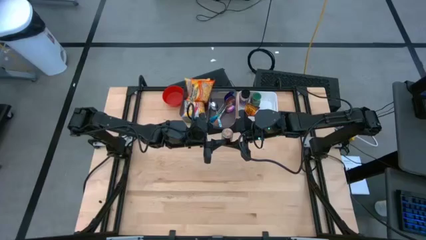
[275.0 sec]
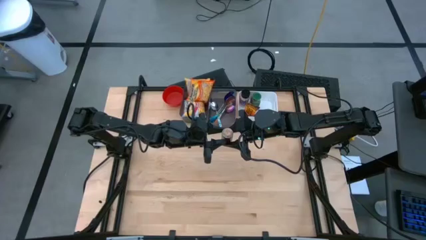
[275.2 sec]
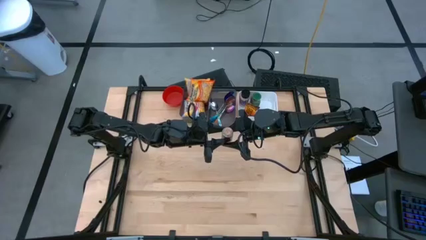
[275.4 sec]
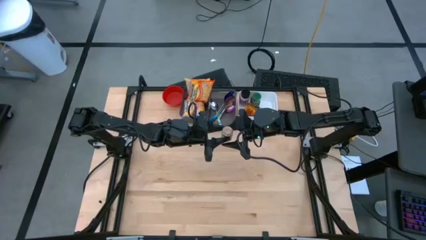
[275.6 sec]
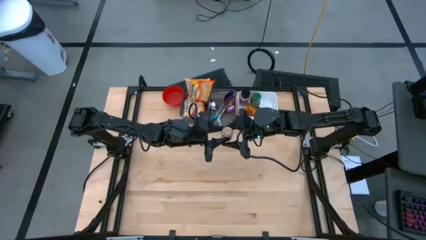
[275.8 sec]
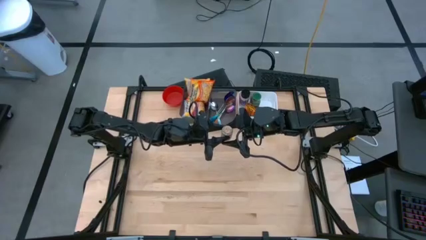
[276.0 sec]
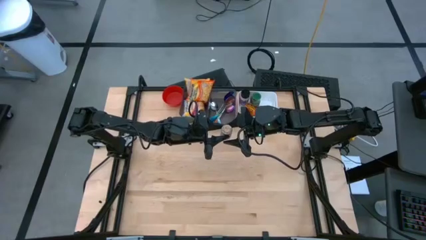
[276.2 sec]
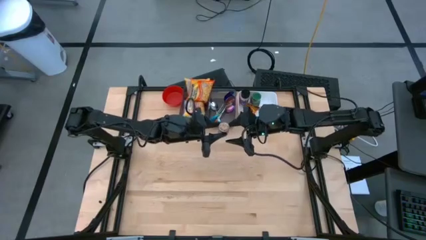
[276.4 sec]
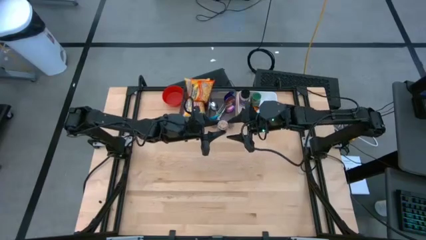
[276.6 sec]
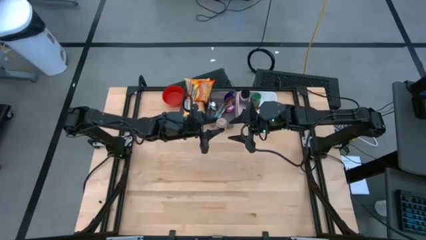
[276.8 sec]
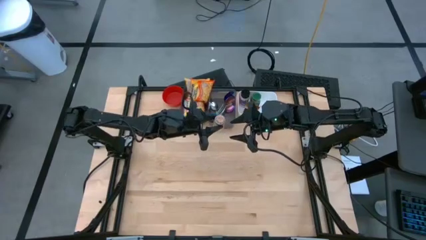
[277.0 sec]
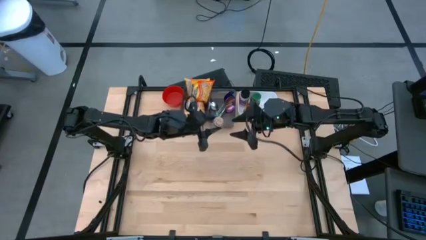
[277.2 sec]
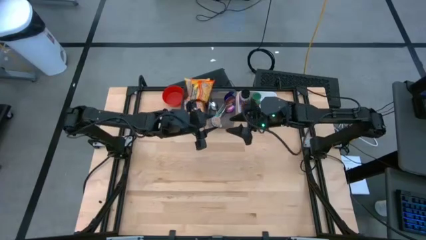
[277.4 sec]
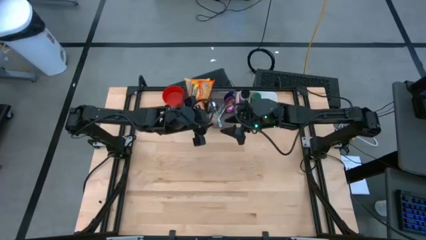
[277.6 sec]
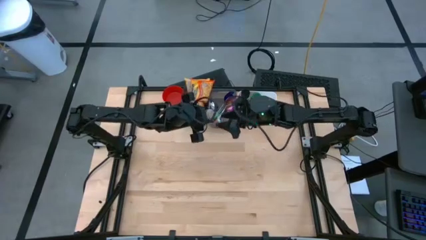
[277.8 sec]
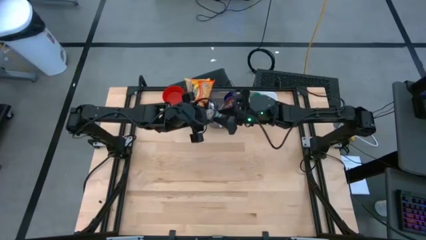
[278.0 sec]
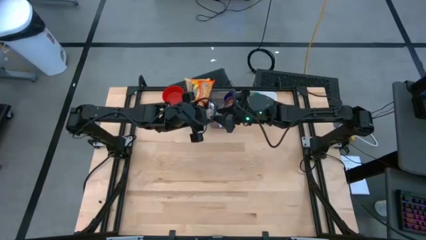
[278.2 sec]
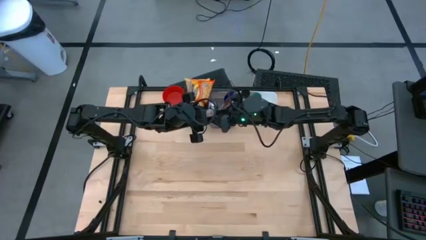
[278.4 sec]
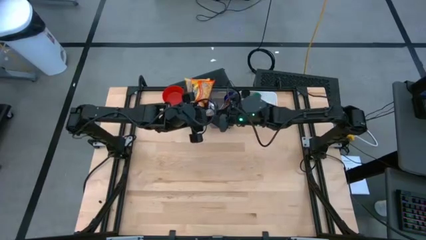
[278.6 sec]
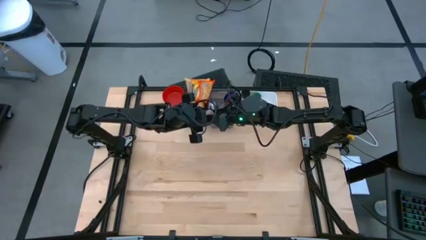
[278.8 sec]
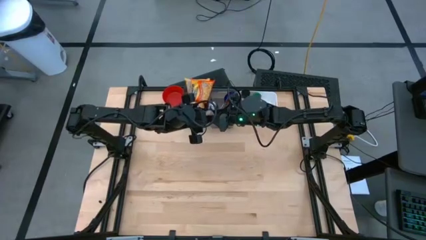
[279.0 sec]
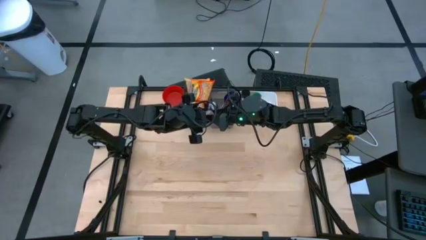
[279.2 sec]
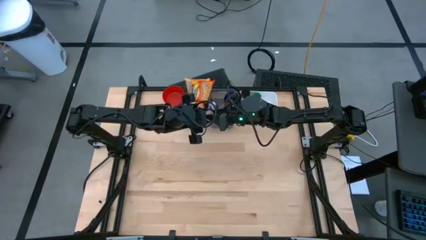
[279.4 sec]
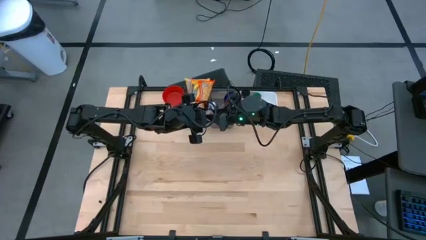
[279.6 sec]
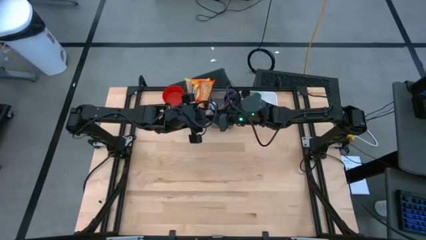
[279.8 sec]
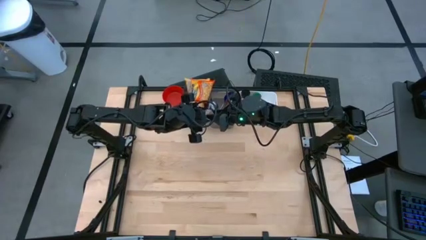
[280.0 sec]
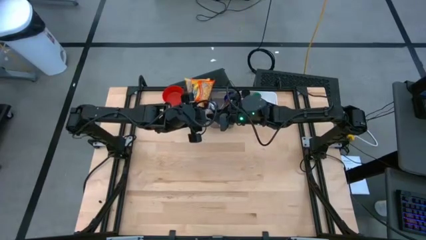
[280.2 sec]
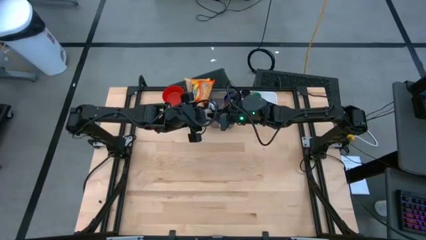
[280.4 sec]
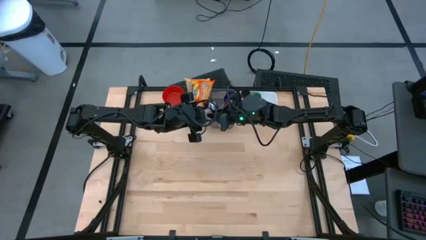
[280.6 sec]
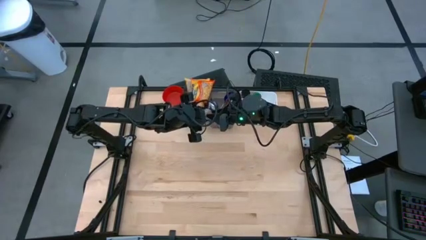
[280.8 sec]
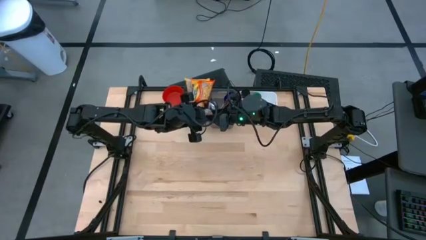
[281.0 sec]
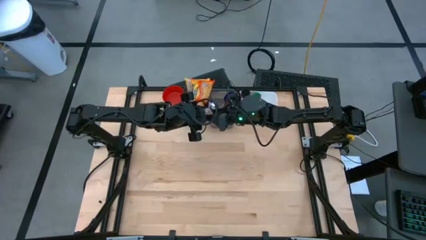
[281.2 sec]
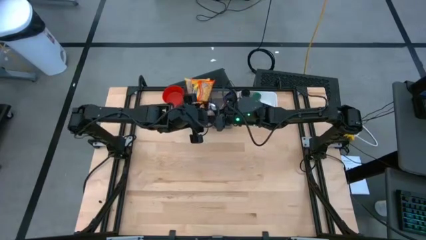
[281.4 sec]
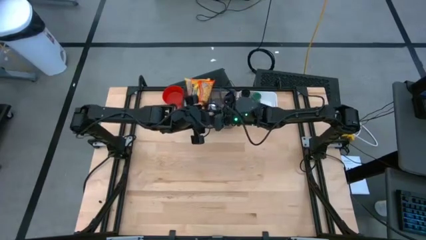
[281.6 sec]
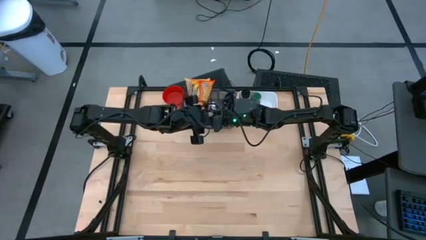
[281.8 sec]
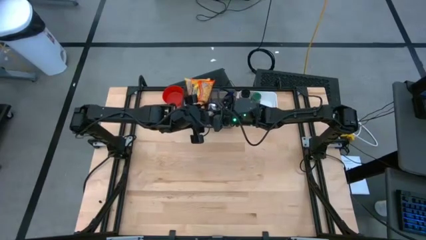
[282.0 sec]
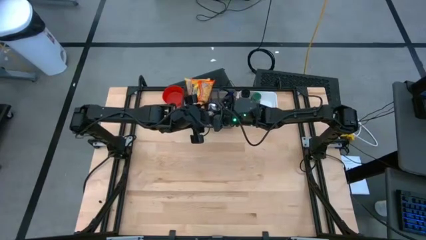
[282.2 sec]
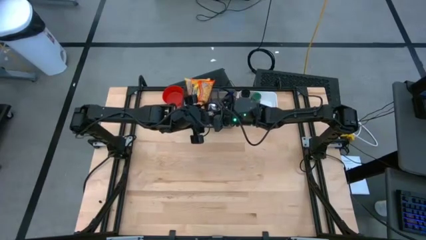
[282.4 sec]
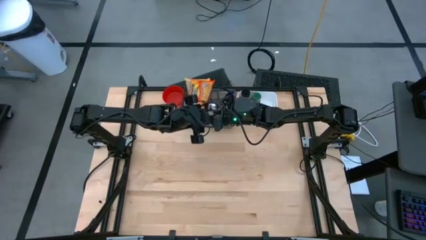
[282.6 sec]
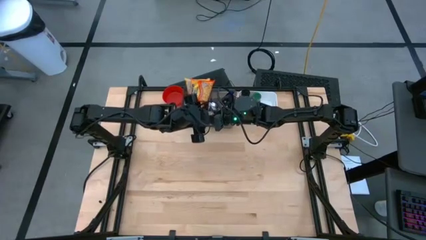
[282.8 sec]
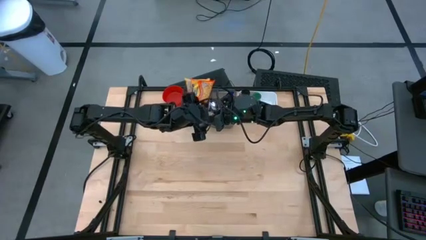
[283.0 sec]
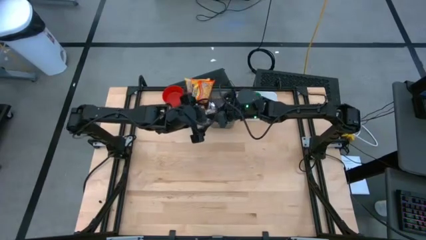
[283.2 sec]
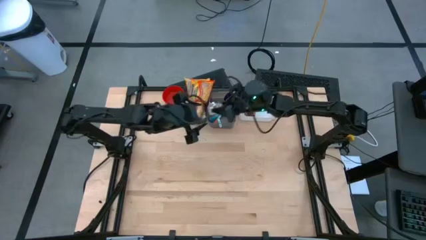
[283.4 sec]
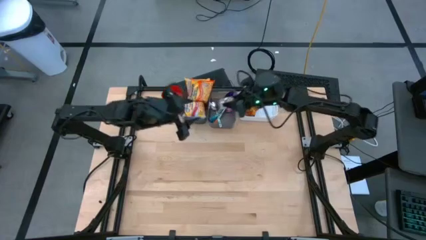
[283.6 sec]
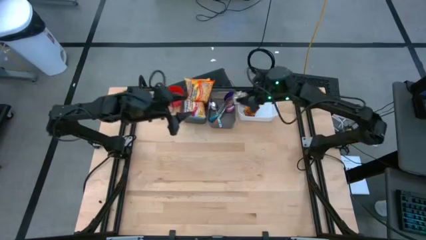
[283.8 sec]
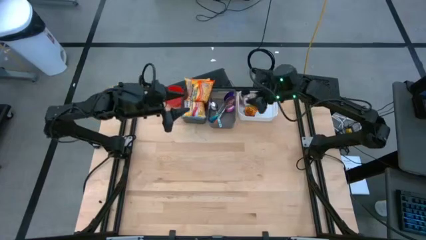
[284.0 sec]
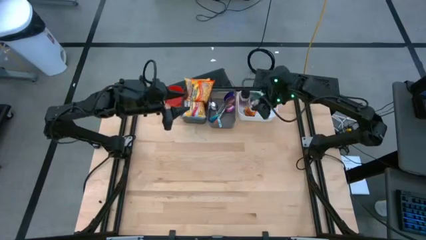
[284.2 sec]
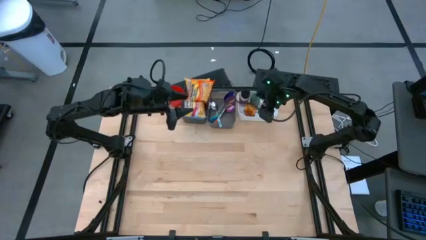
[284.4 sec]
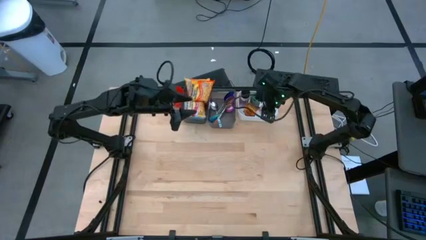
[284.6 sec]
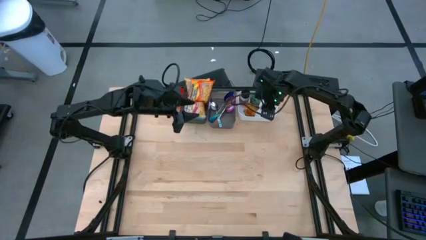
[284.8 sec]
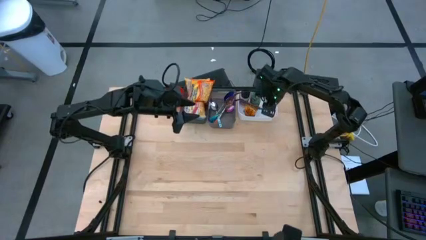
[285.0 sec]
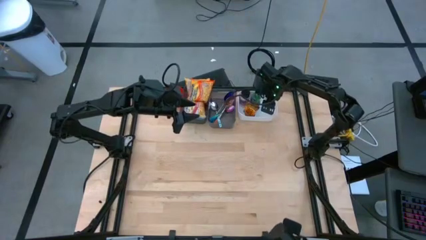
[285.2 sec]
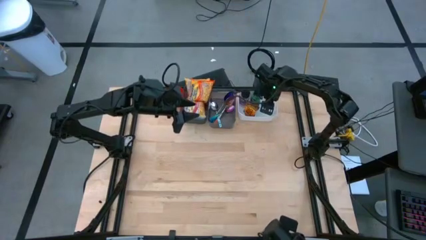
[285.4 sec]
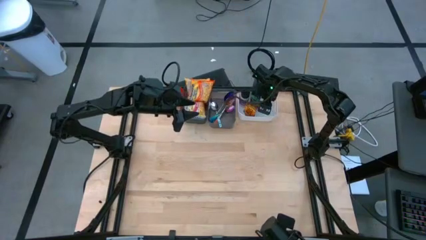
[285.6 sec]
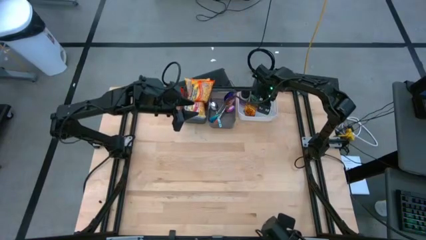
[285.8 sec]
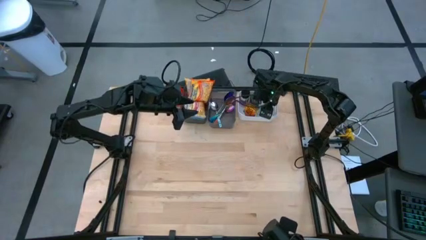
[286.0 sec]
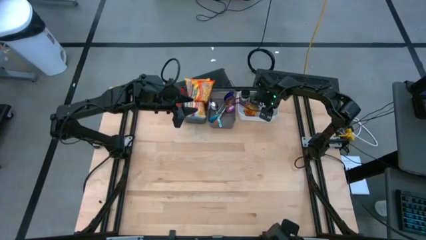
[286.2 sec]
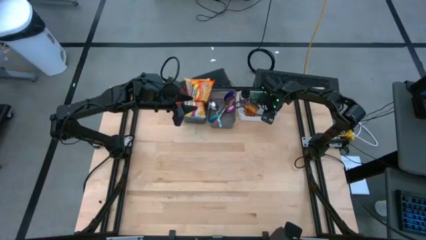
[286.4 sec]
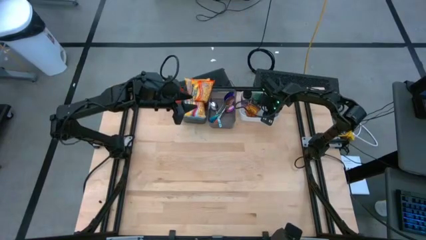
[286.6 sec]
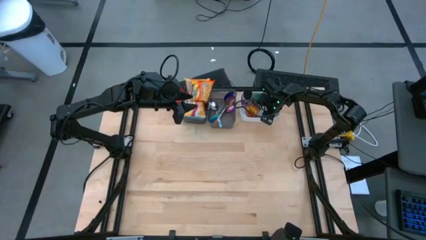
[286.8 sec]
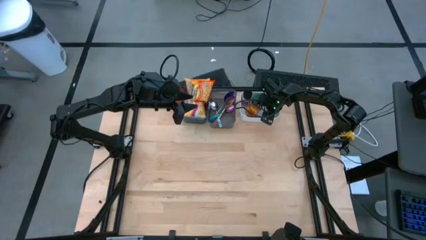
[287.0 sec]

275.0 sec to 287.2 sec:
Task: Pick & Place Food Item
Put the brown seasoning bottle into the white bin

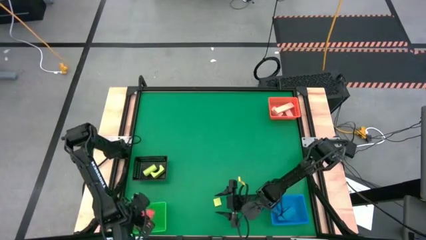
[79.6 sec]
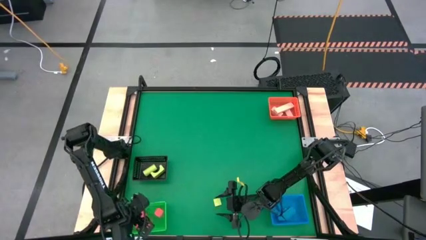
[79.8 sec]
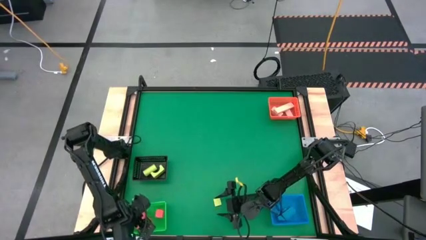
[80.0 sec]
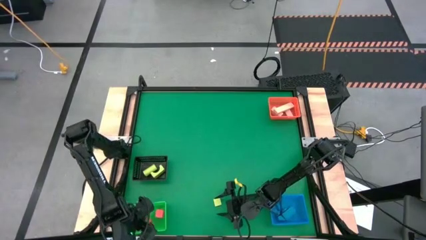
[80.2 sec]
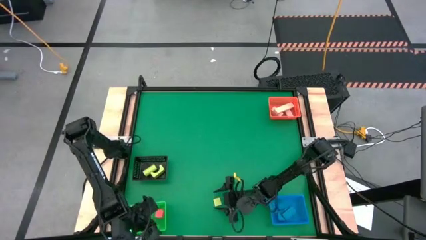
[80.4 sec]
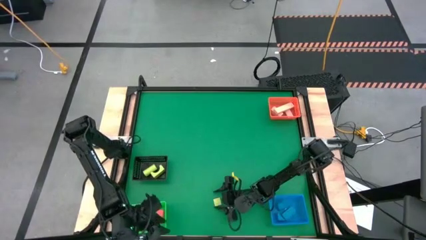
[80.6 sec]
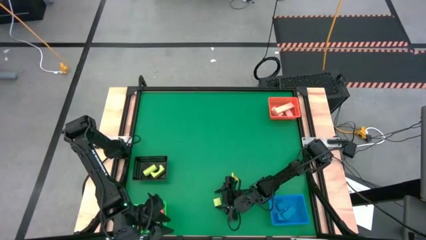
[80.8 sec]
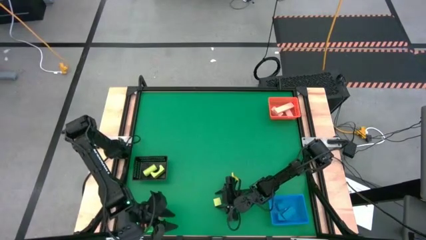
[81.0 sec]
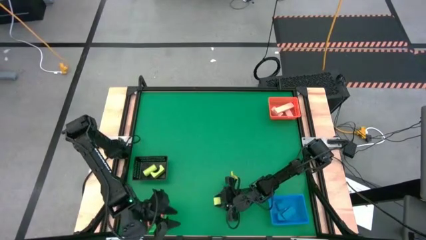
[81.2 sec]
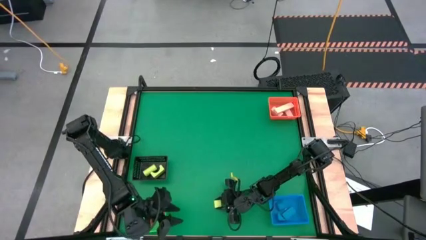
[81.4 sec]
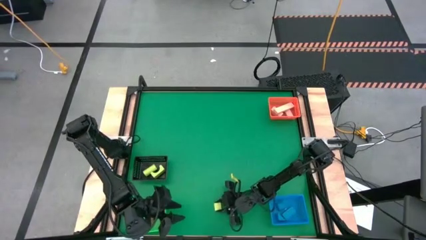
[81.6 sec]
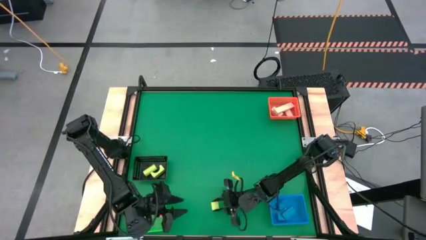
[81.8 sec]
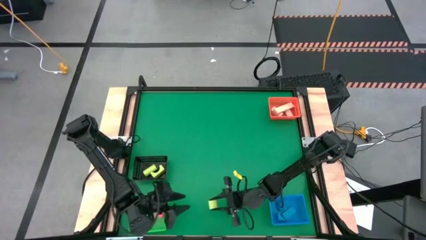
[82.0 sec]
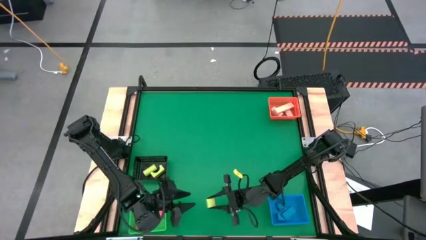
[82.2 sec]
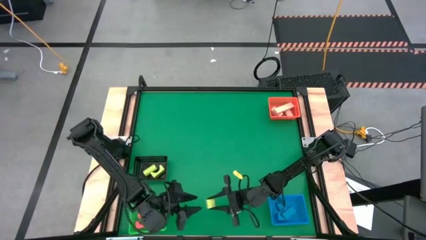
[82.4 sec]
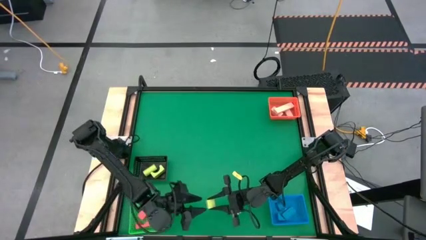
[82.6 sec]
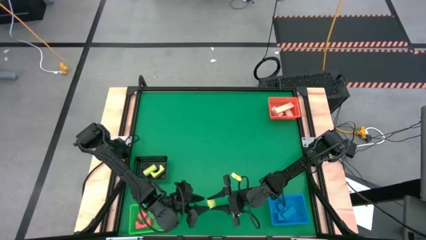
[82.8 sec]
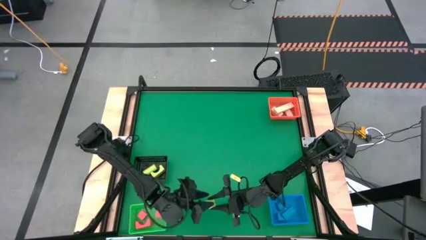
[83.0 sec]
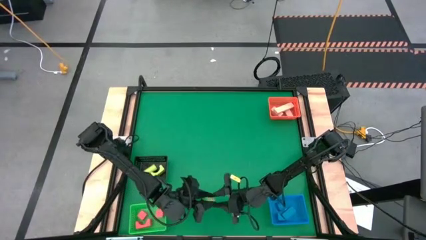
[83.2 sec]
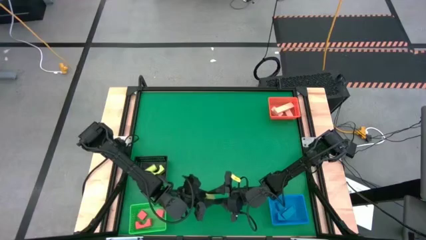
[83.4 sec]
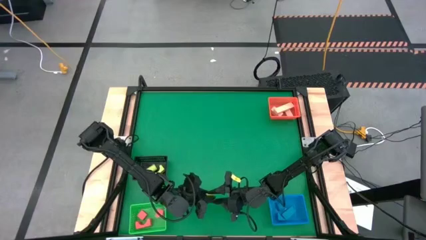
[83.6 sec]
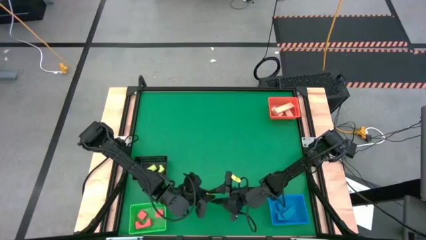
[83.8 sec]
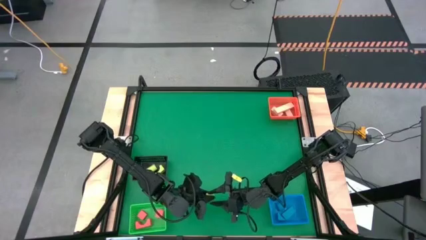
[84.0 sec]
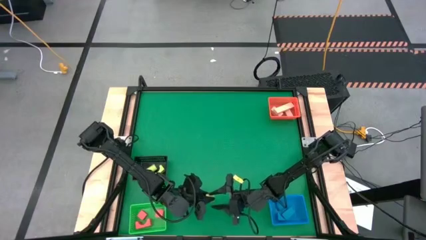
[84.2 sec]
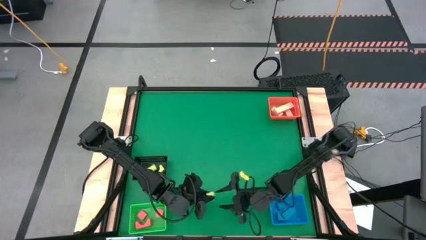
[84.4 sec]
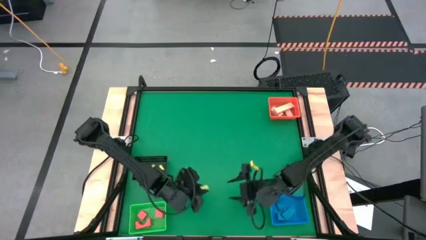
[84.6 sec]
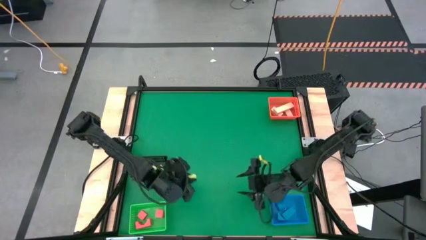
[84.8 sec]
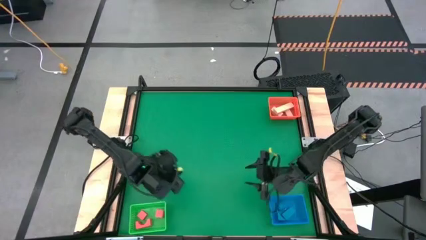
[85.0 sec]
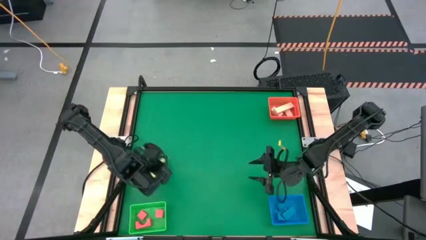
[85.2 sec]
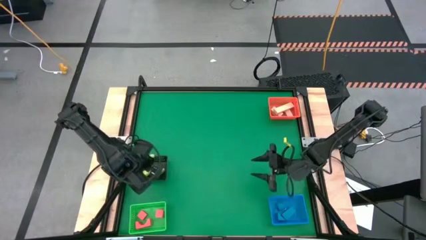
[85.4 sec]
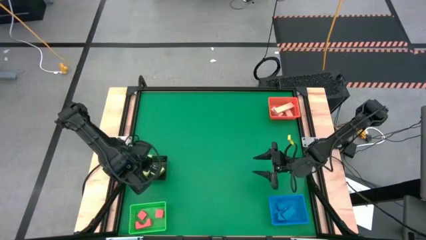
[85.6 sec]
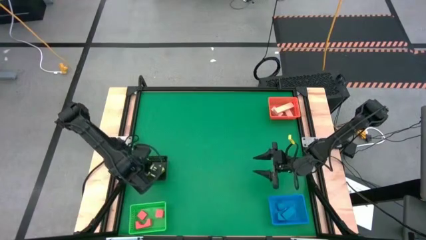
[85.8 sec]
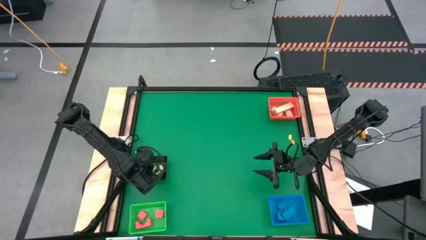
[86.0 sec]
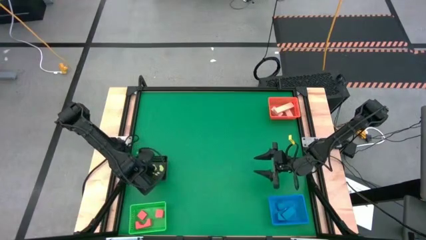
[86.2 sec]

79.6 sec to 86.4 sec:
Task: Sort & place blocks by color
Put the yellow wooden block into the black basket
